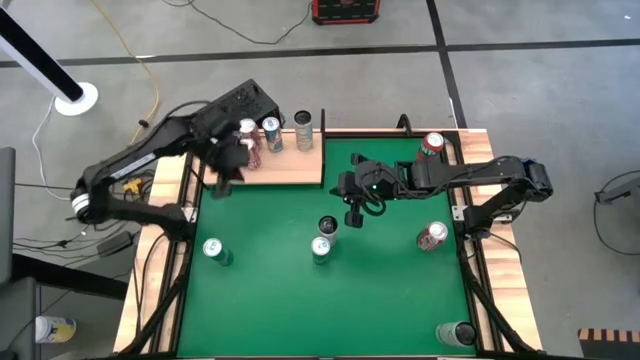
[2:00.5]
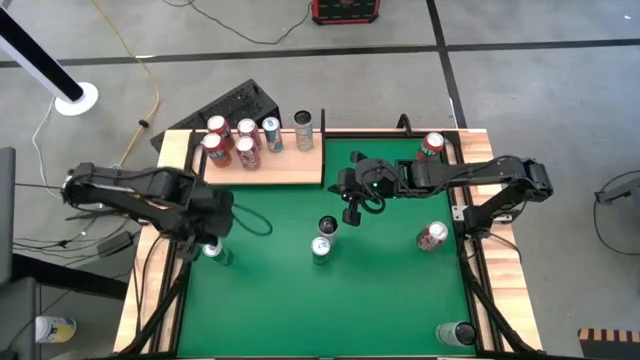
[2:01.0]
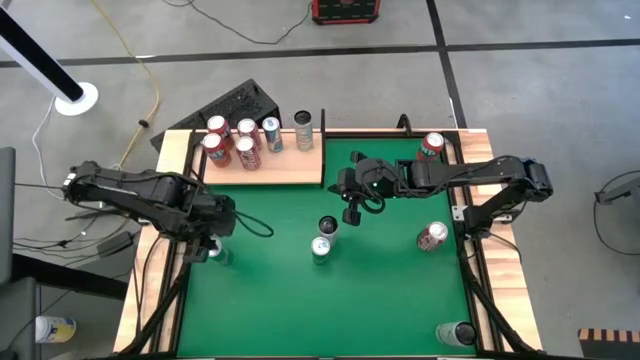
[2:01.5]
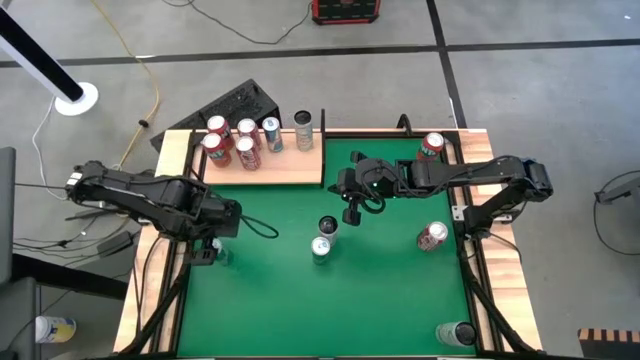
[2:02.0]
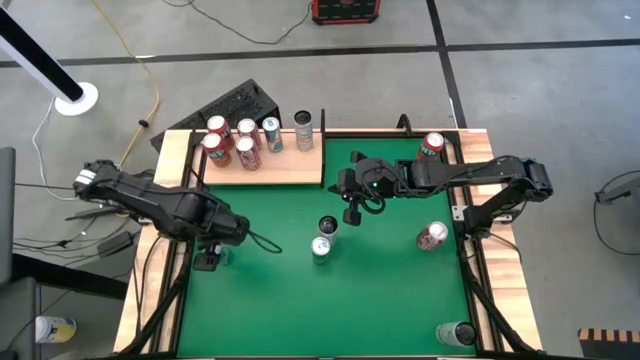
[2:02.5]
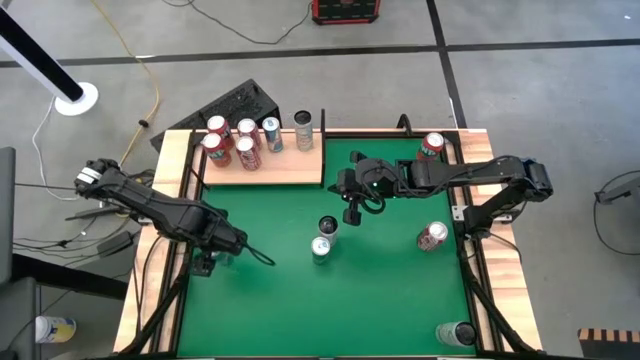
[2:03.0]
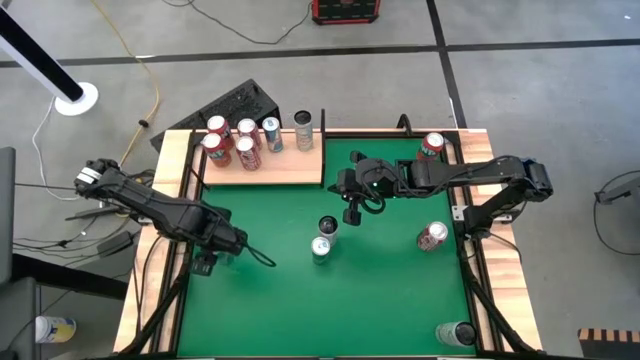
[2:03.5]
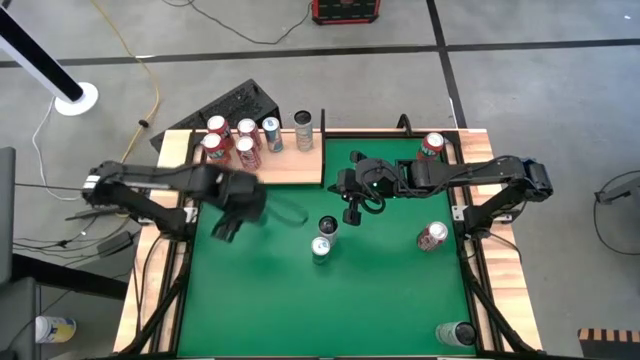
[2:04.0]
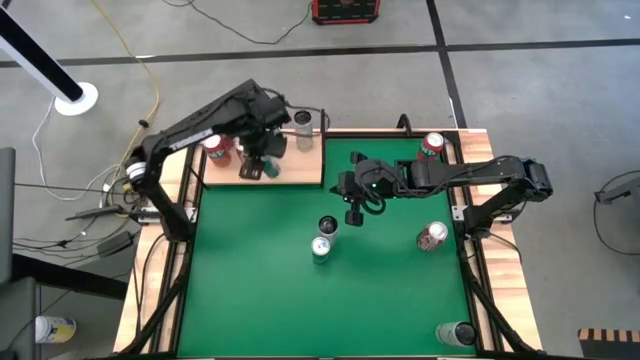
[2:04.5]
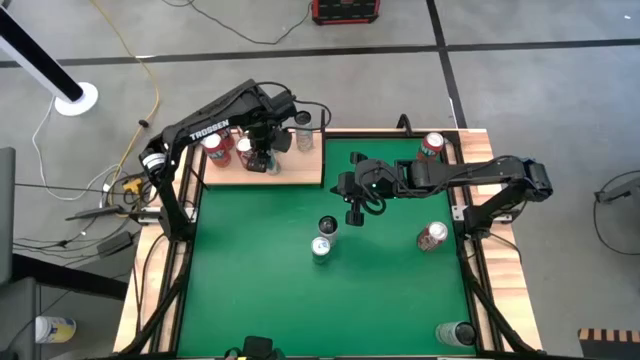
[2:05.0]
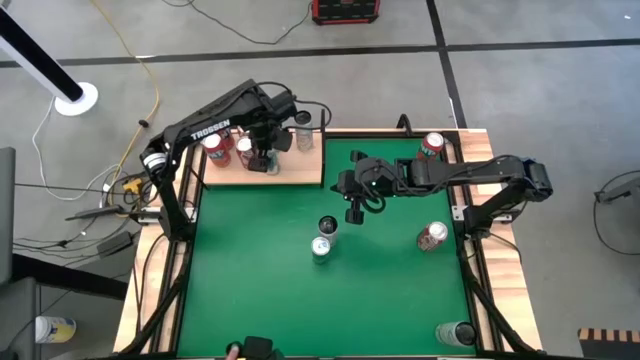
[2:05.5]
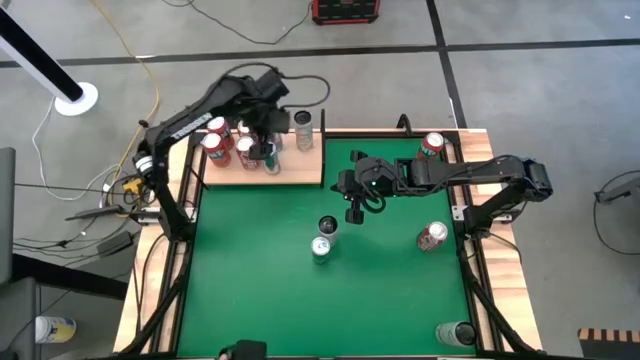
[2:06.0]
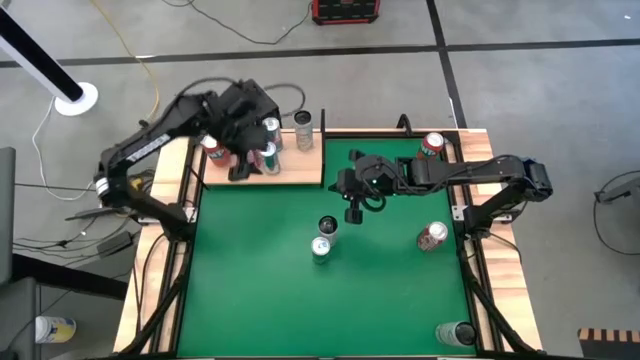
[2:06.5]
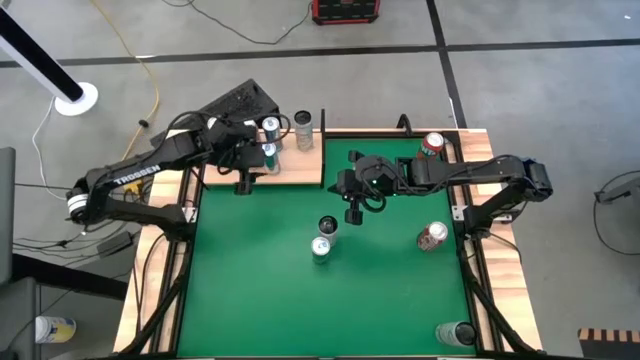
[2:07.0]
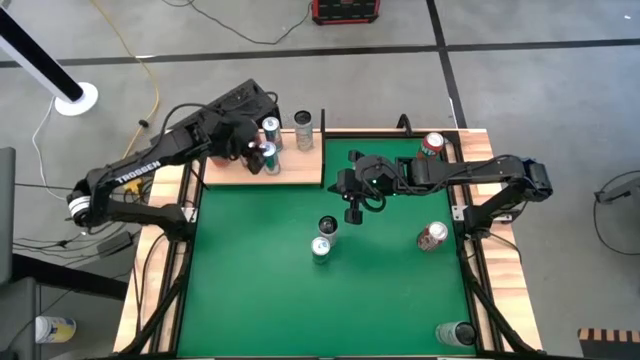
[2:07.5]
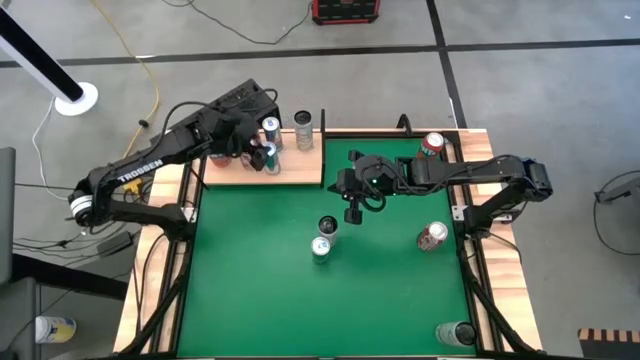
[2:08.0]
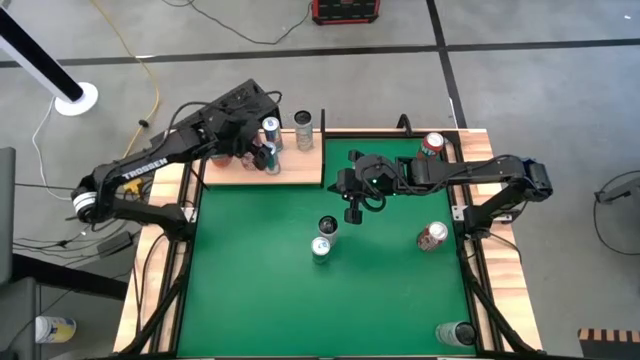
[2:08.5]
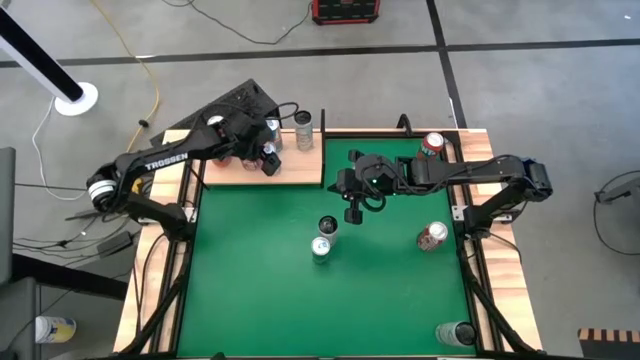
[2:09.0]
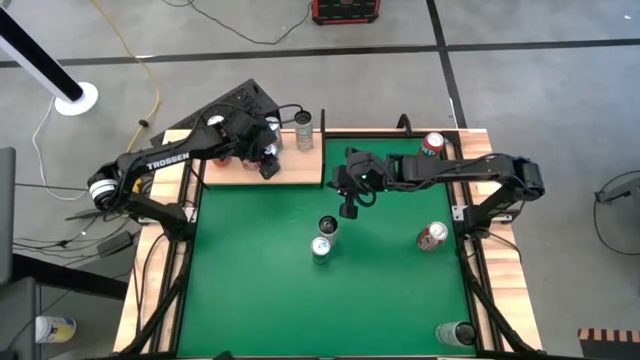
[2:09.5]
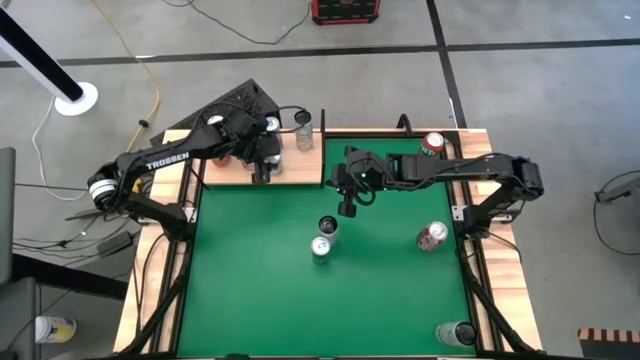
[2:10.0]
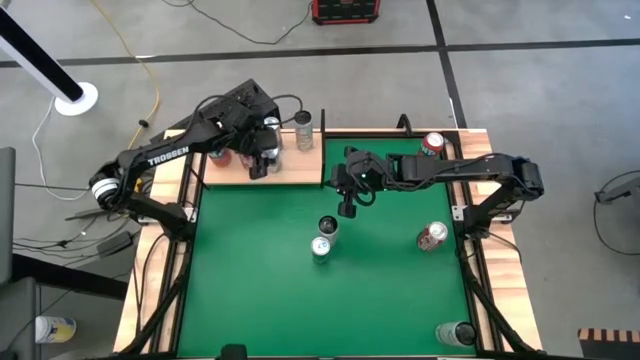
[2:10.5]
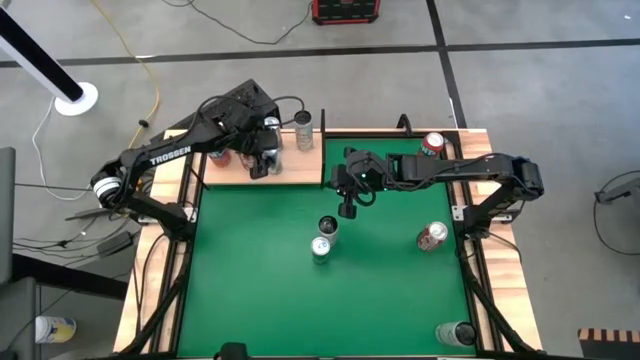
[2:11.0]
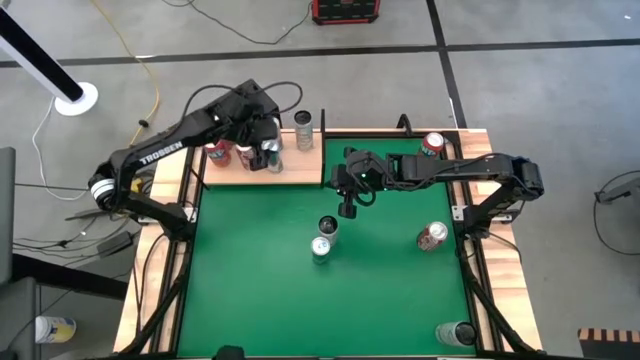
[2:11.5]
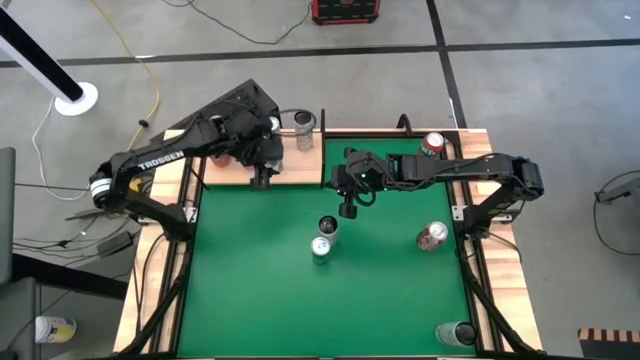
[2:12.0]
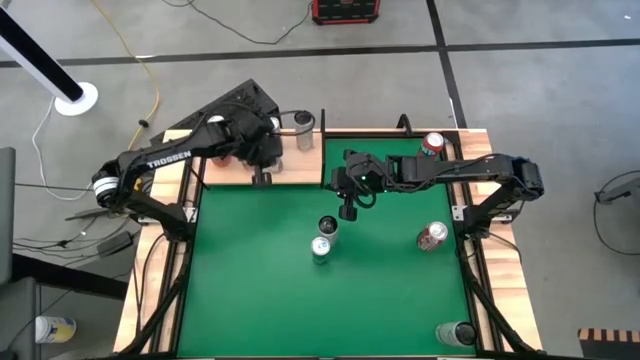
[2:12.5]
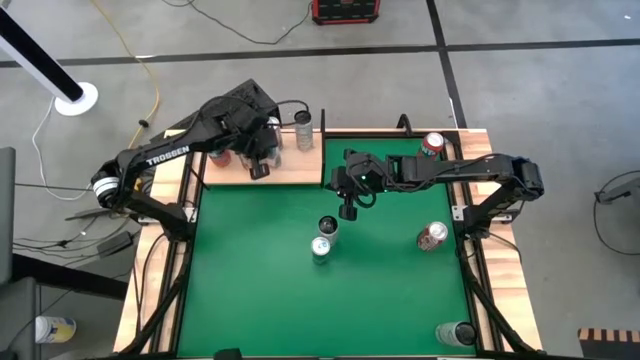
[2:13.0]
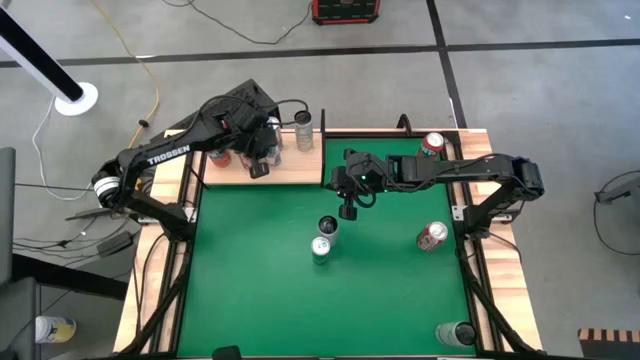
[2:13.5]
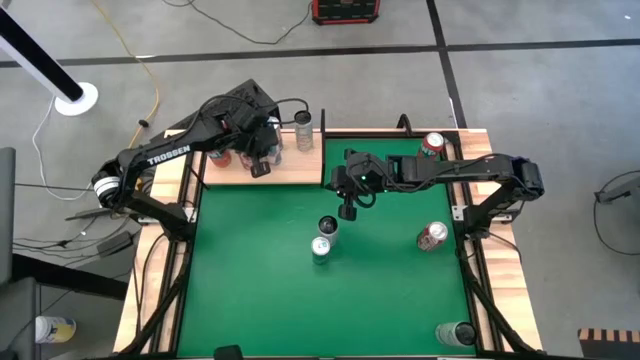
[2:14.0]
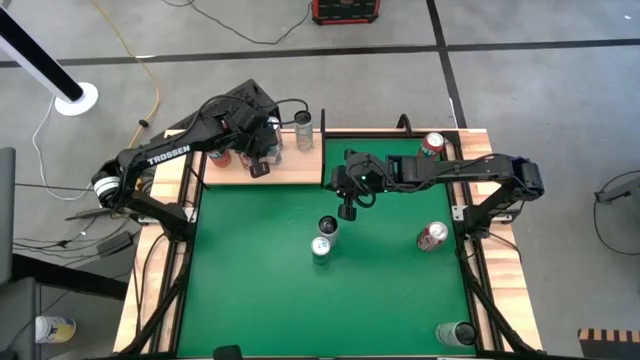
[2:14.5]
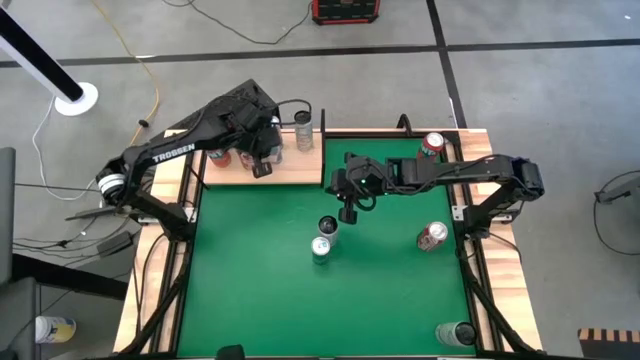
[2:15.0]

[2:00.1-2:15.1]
Task: Place canned beverage on shelf
Put the left blue soda can on the shelf aligned with the other blue soda can

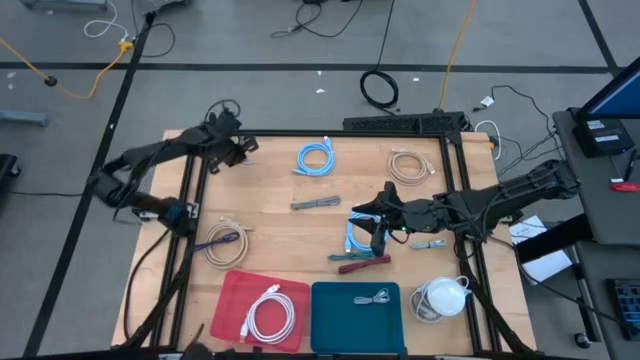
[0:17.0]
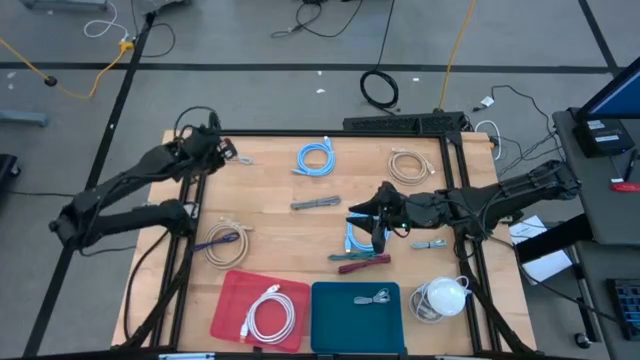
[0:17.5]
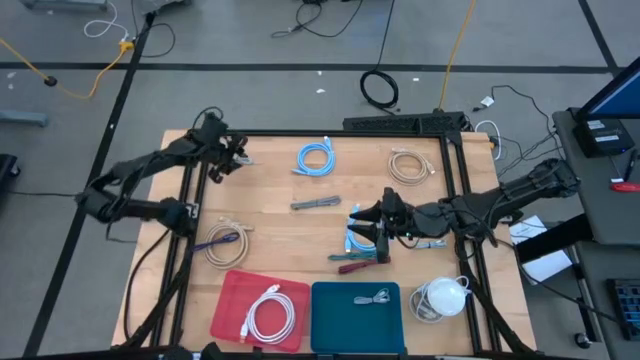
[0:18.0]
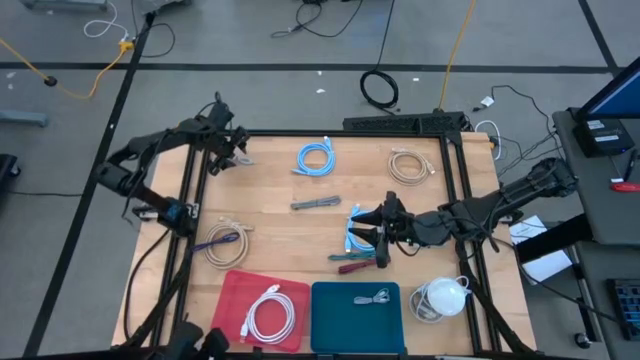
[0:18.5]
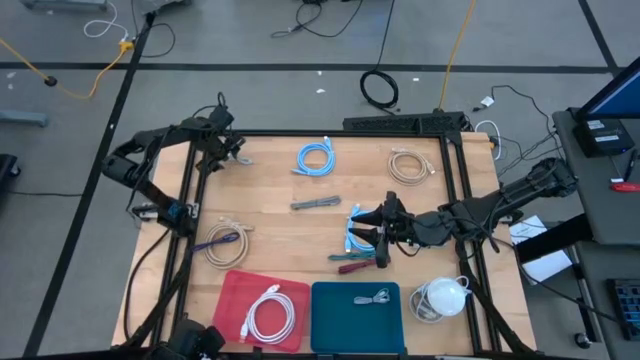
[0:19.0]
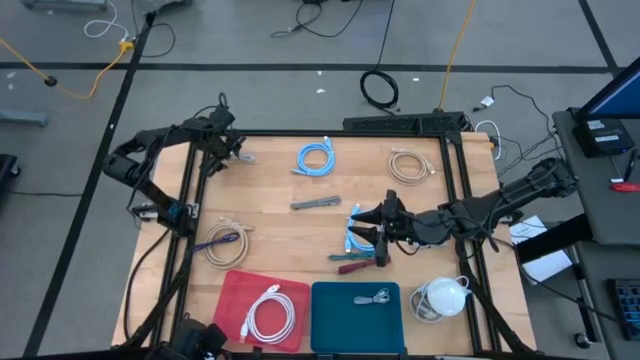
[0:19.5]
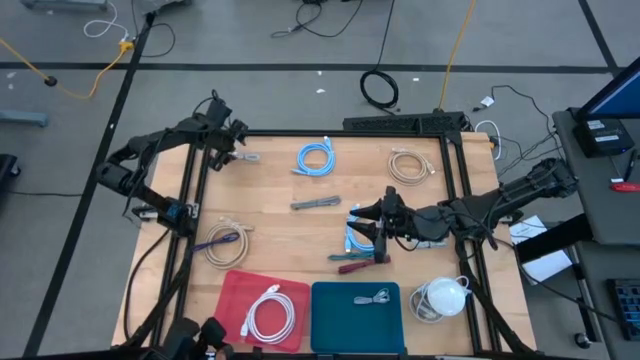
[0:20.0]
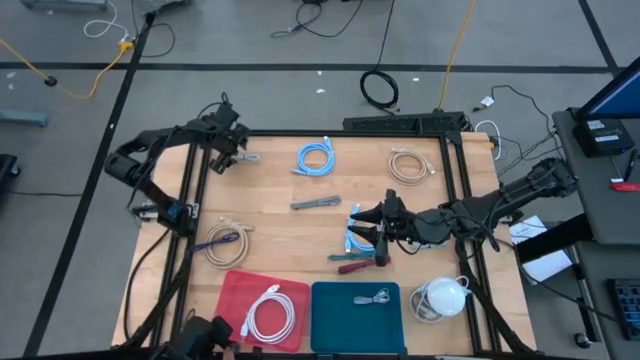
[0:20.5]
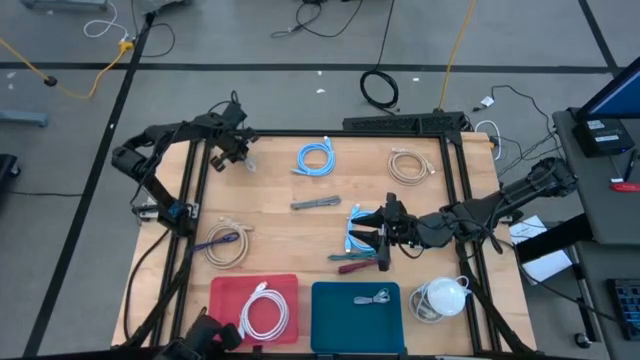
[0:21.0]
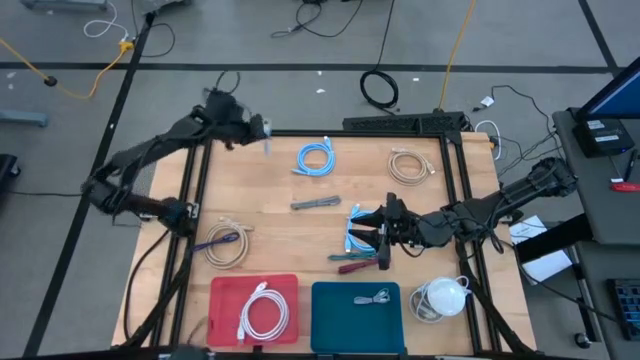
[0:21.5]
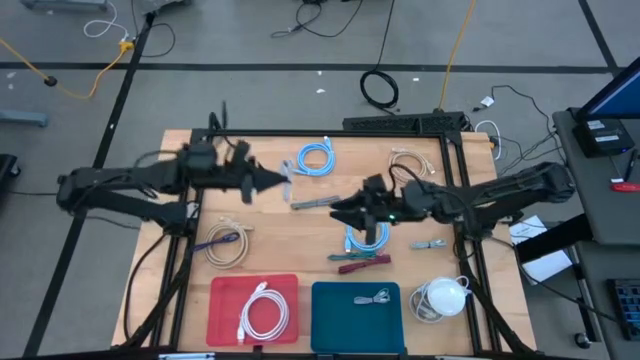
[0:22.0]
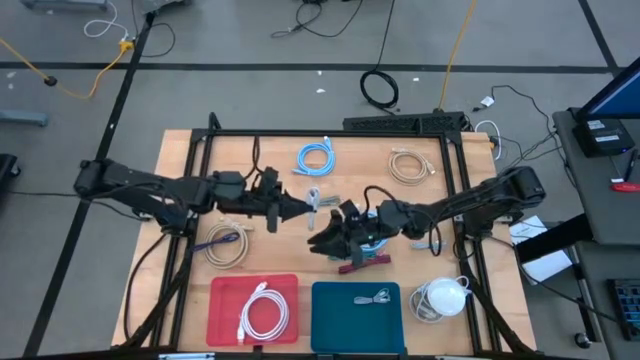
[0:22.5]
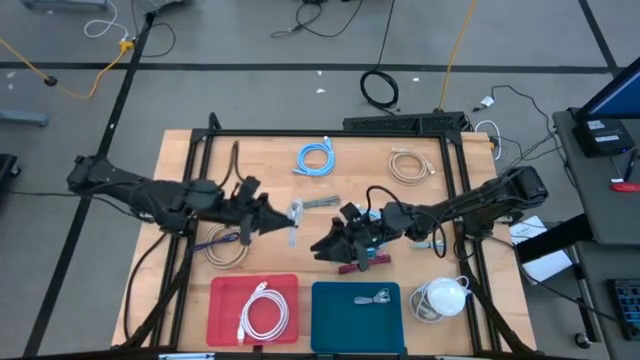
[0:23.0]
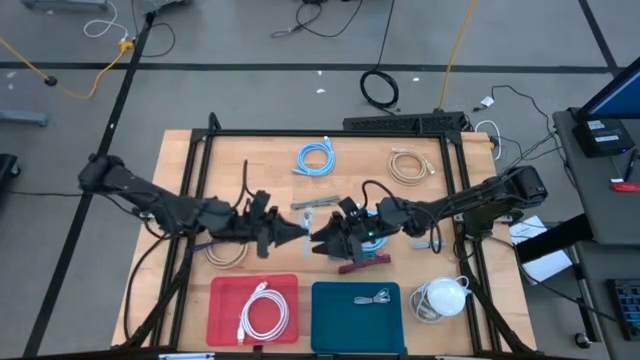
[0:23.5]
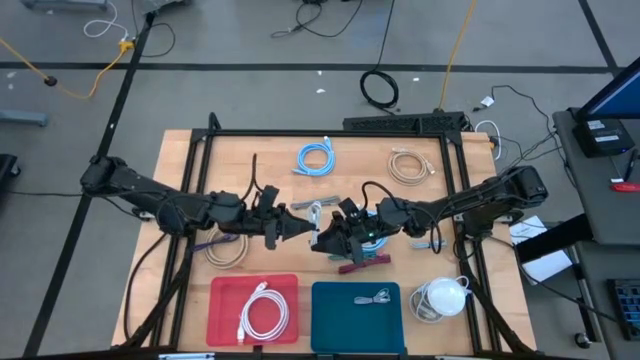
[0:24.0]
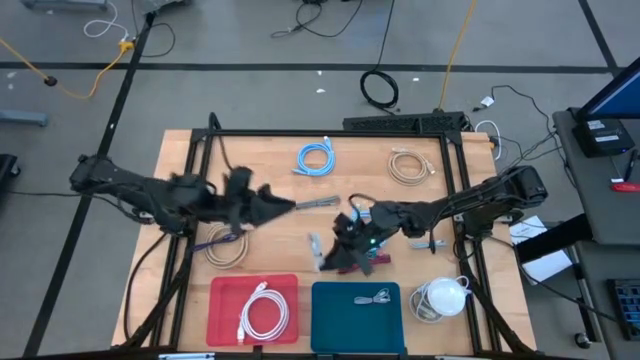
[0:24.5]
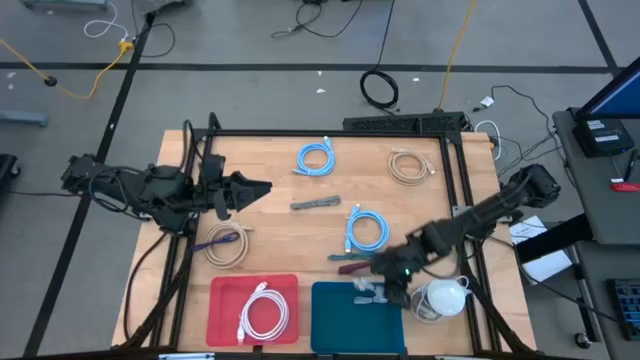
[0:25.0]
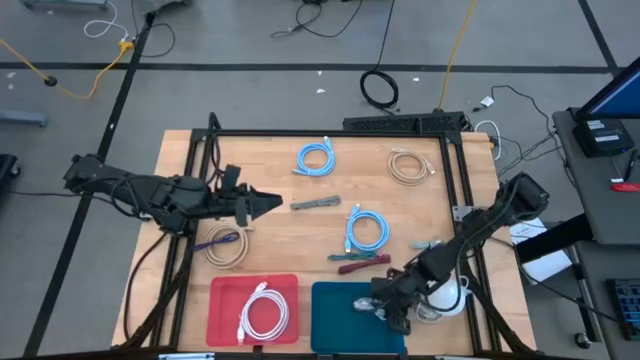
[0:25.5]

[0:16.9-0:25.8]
Task: Pick & Place USB Port
Put the top left white USB cable into the blue bin
